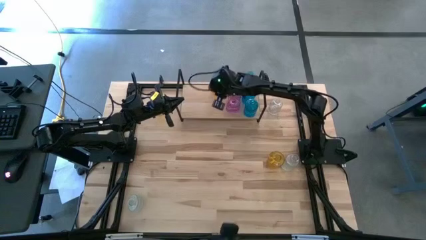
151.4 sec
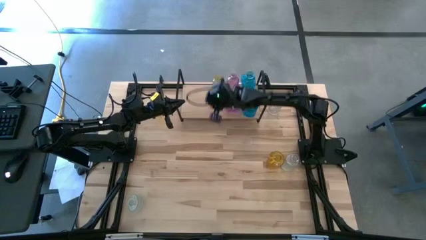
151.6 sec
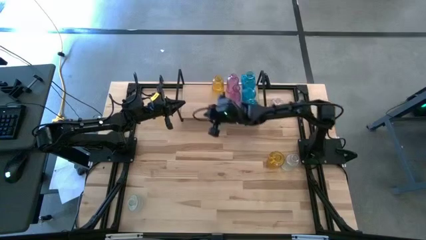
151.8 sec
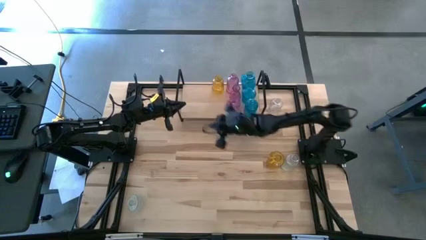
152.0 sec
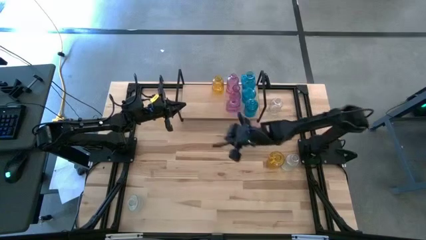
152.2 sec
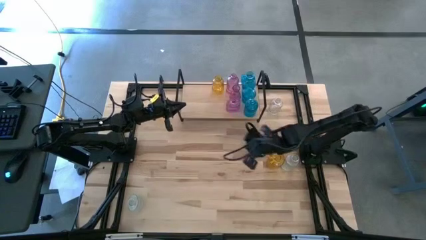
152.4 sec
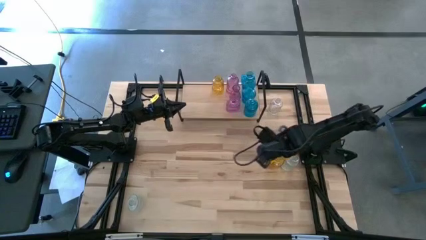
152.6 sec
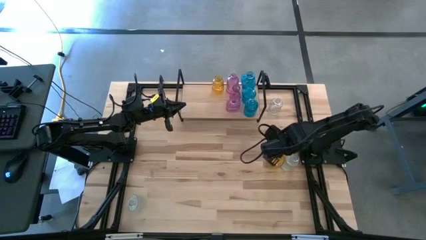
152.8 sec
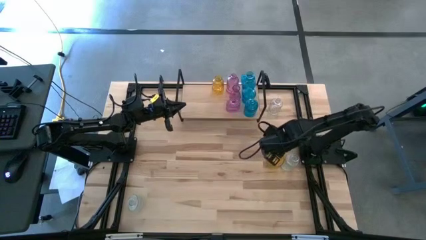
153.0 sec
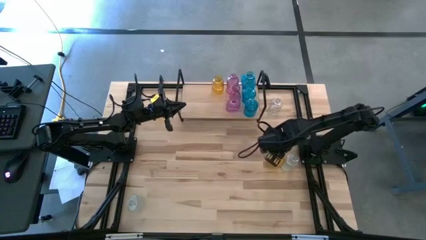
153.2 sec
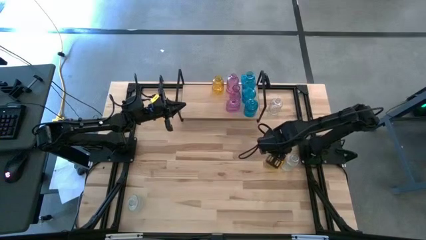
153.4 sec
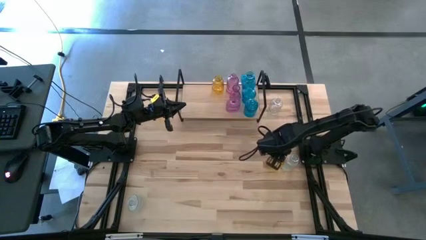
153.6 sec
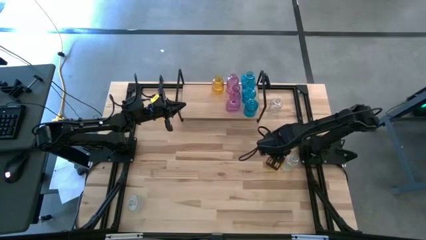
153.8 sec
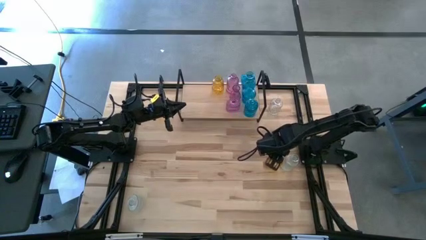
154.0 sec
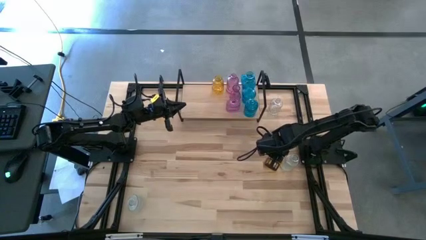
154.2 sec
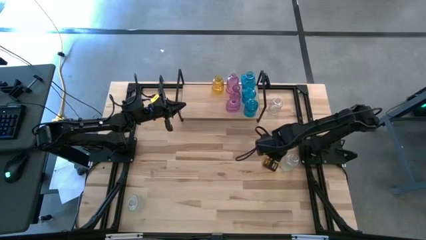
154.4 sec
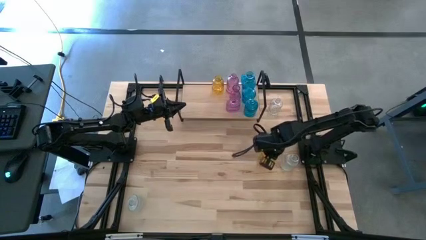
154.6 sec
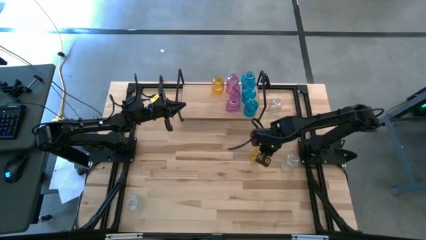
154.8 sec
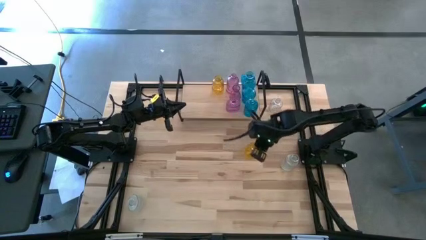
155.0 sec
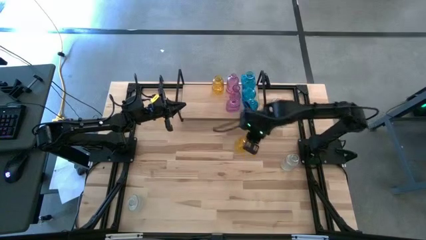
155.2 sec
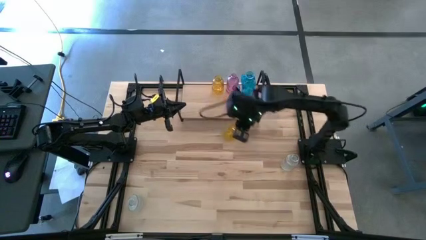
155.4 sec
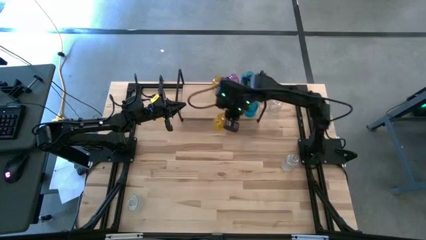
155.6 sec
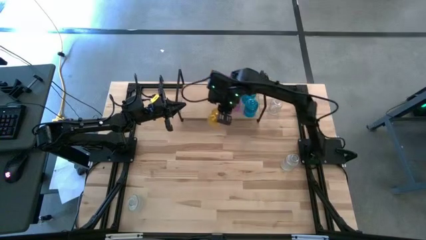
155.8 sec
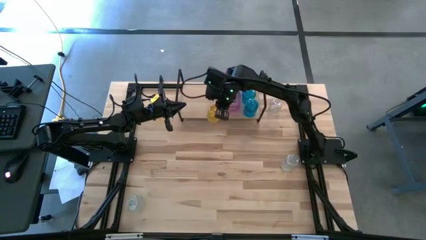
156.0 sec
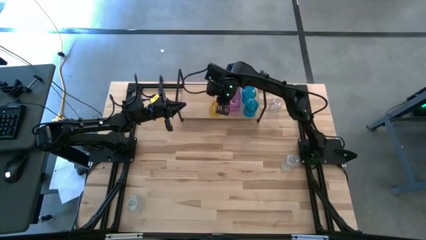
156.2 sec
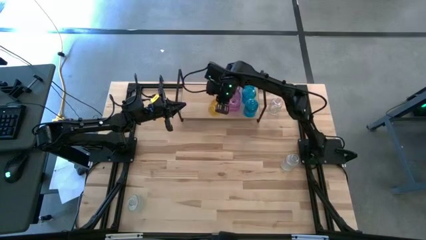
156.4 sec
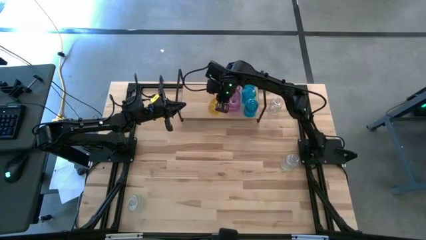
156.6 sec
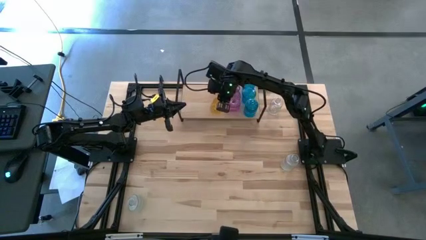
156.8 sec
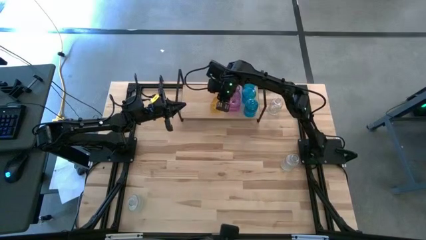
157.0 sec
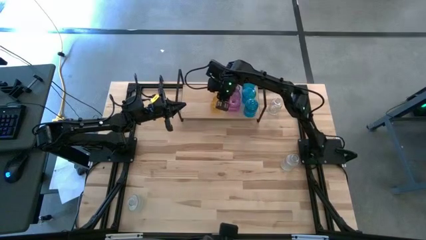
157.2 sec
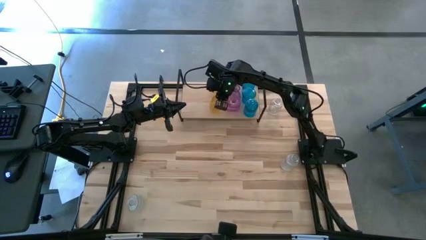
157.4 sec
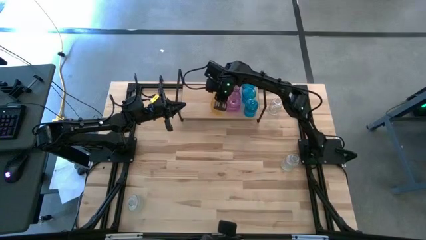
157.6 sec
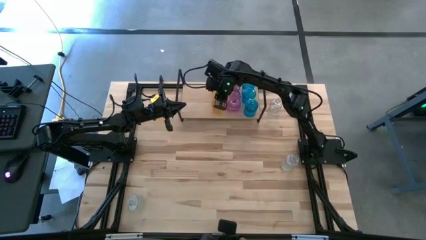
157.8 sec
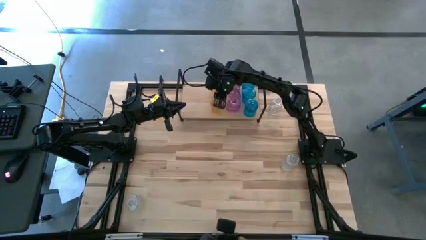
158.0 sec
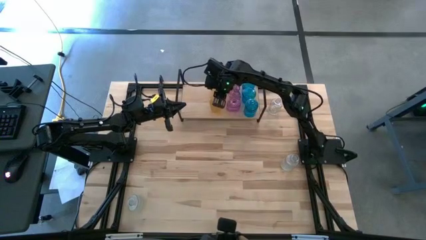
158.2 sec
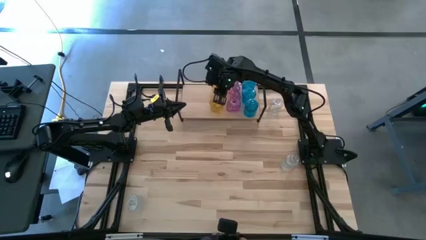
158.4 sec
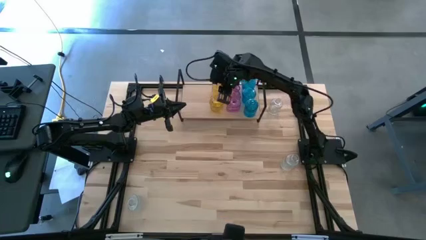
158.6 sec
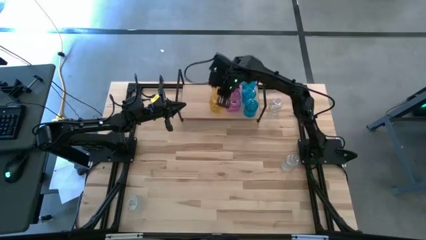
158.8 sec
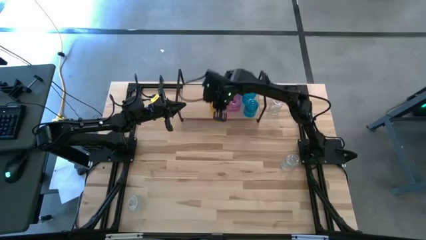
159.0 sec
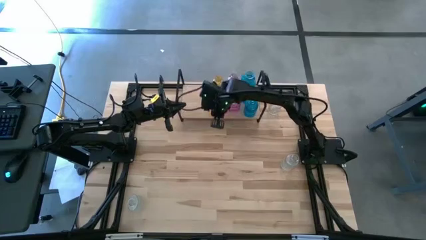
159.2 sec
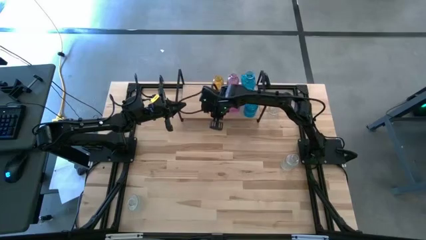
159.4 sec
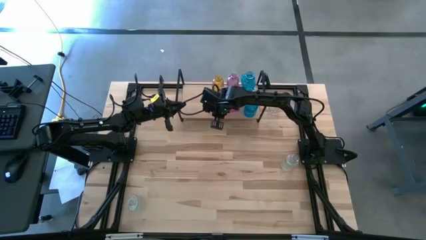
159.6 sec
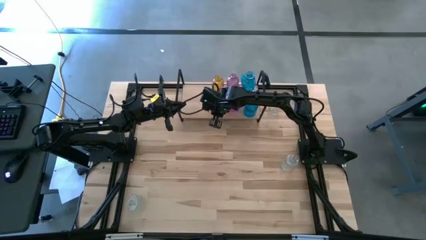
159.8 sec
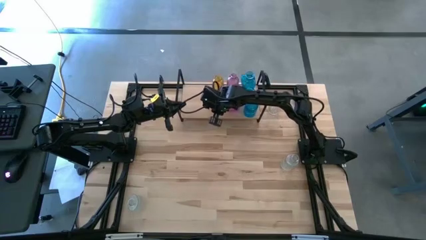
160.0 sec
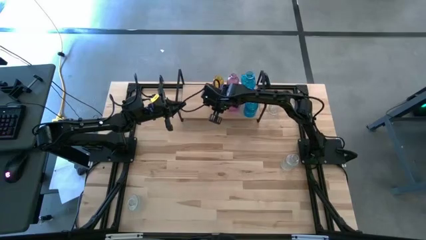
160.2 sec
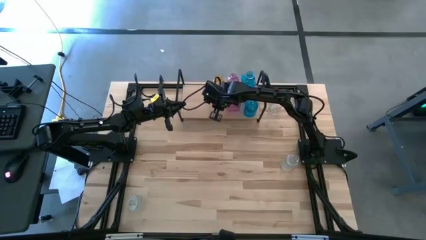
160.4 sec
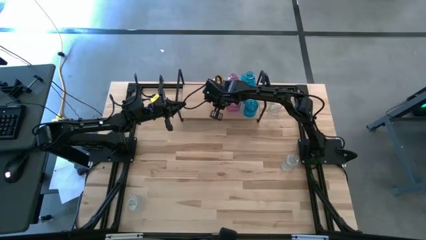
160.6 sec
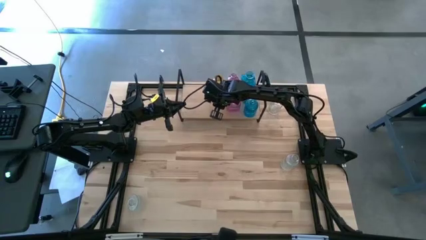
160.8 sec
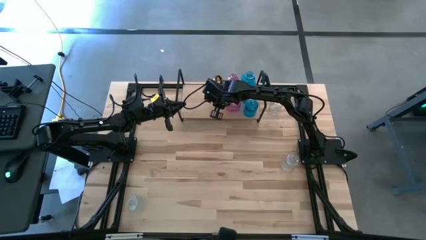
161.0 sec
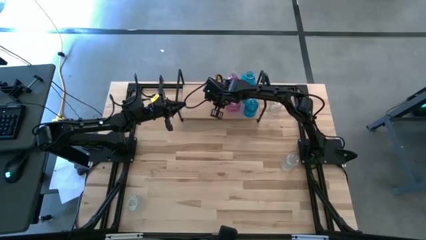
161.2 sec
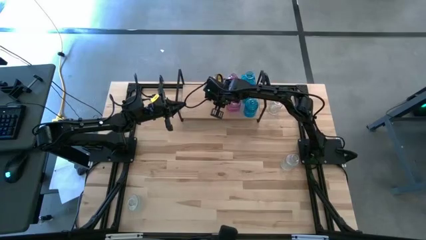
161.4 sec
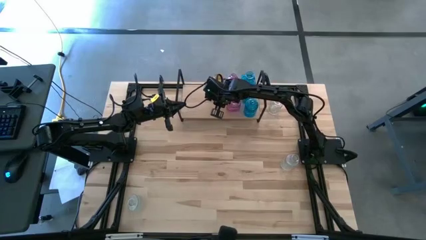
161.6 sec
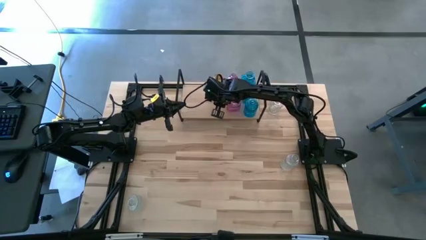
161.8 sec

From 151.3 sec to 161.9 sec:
Task: sort vases onto shelf
Put the bottom yellow vase on the shelf aligned with the other yellow vases

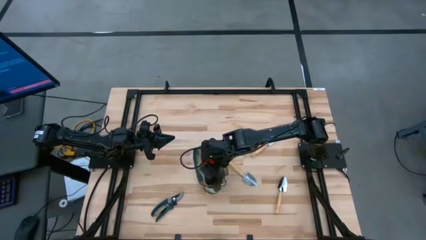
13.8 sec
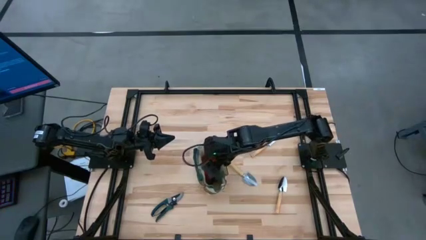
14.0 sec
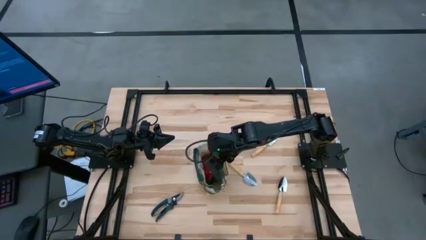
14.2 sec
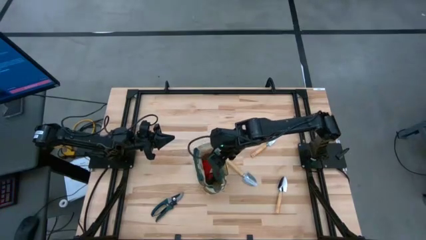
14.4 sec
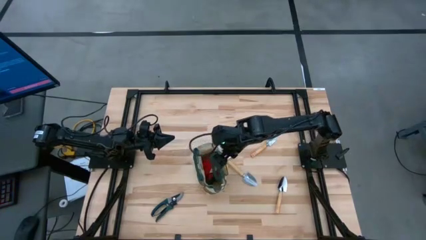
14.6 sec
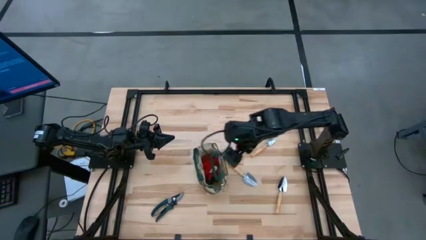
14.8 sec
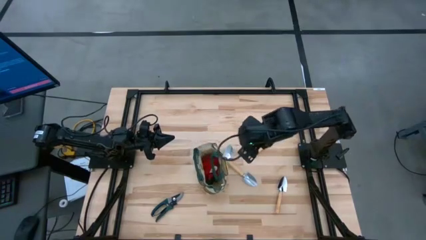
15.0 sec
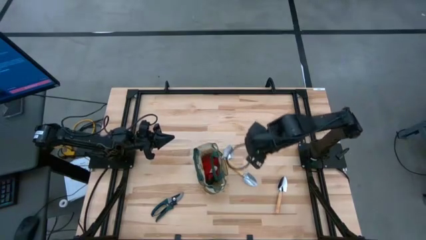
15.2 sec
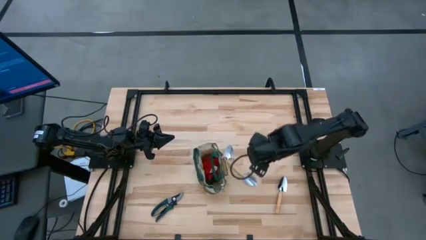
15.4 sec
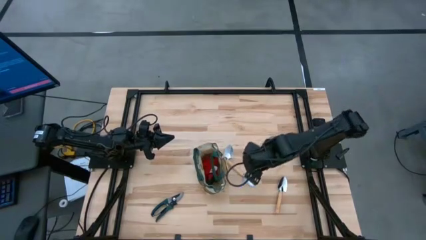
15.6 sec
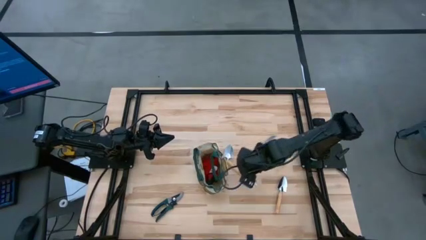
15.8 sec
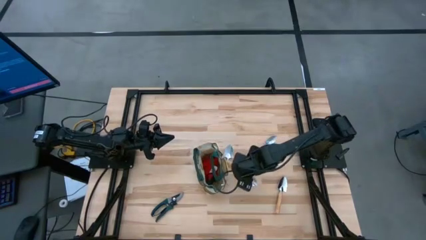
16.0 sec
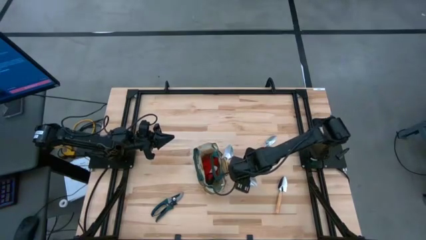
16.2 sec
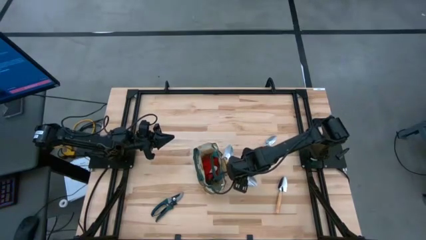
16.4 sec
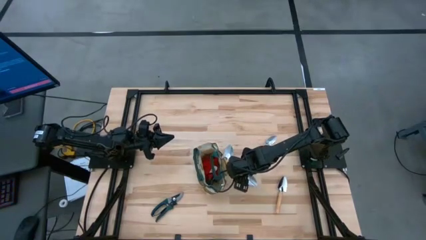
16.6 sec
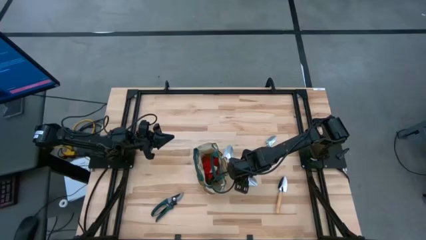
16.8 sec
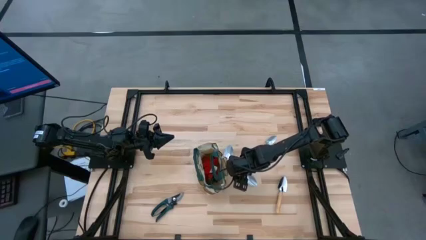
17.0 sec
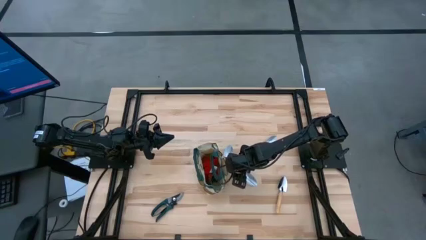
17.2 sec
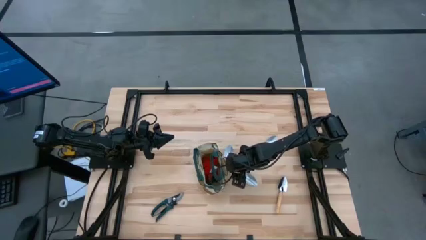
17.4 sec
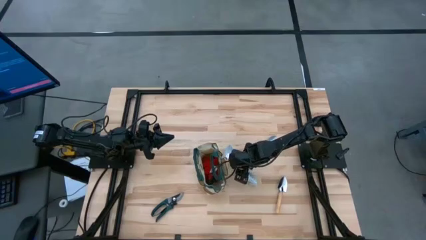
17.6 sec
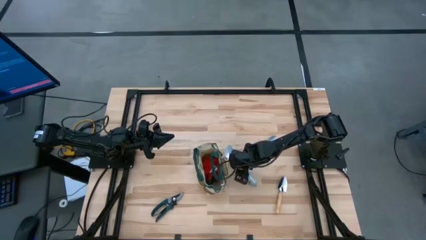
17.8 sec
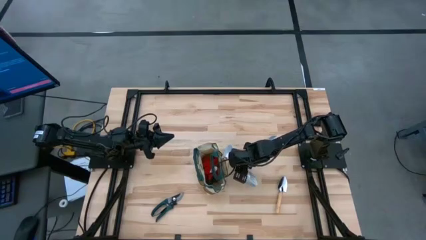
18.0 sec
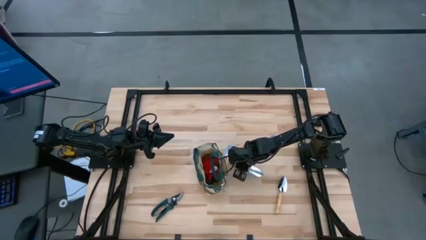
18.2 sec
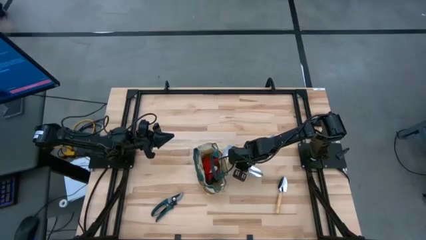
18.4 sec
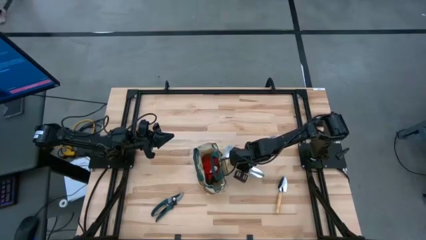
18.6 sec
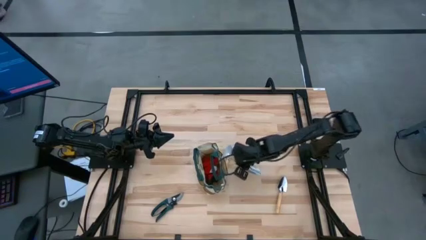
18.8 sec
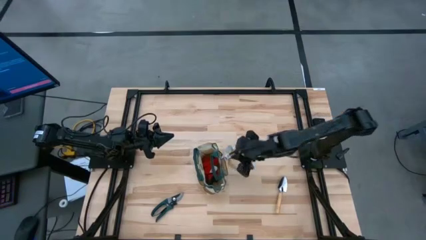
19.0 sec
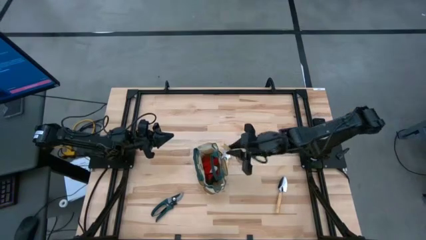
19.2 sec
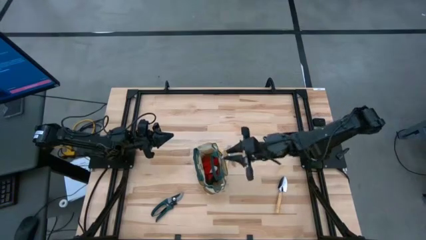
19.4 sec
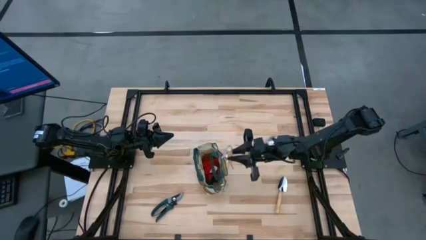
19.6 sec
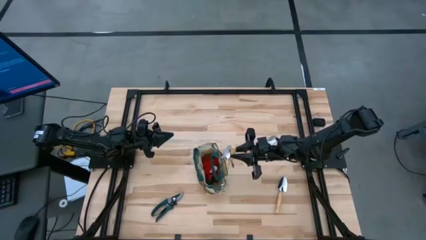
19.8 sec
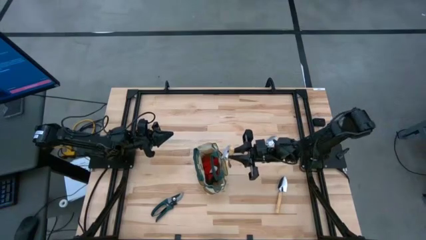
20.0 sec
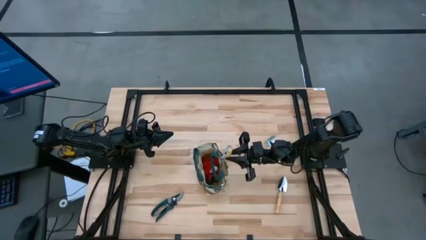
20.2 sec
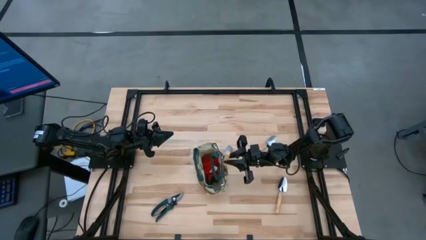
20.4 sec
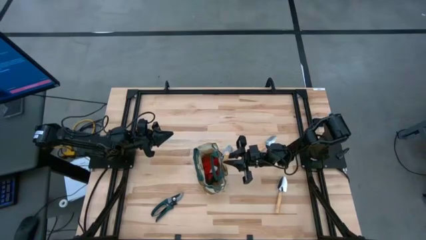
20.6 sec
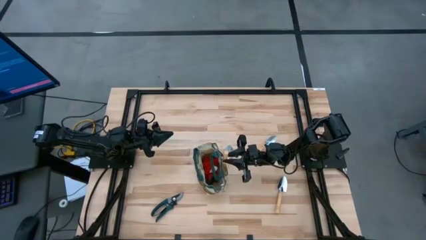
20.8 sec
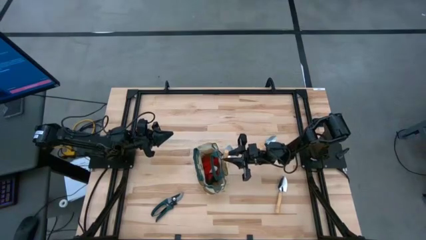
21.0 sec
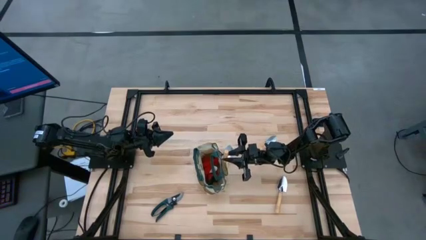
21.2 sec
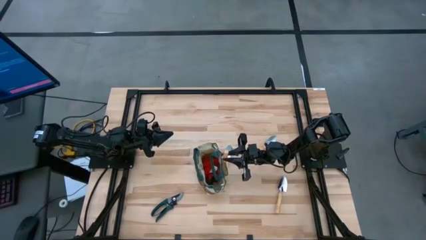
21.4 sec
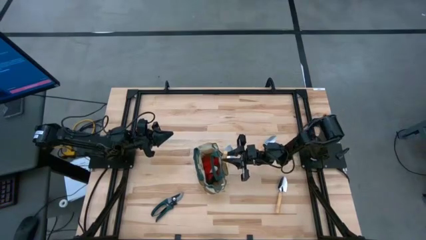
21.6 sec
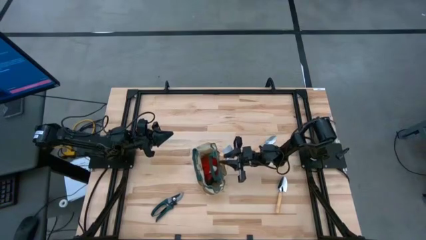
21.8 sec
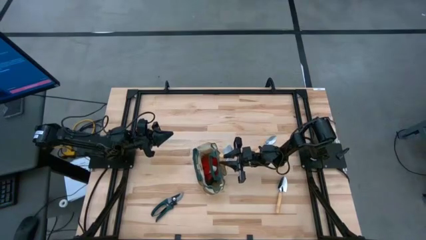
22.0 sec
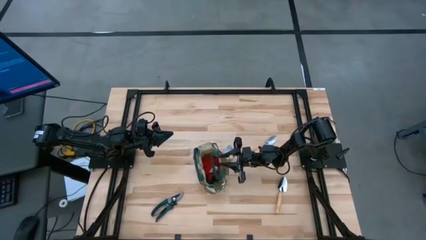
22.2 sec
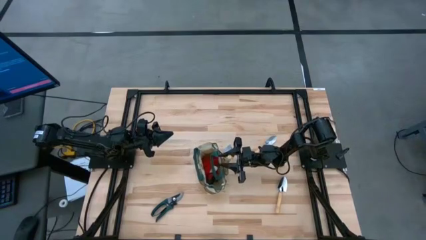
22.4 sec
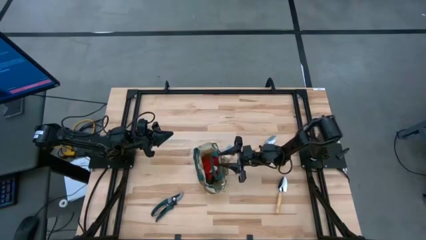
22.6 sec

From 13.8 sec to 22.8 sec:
Task: Pick & Place Garden tools in Gardening bag
Put the trowel into the gardening bag
